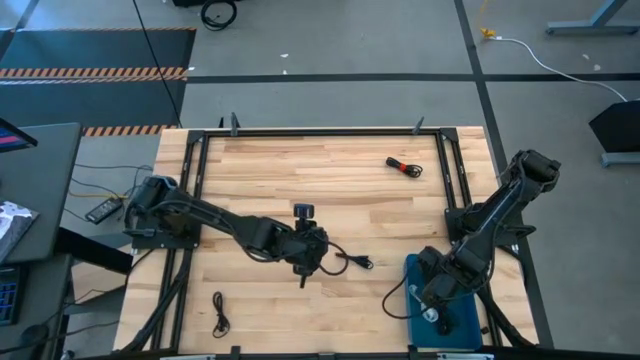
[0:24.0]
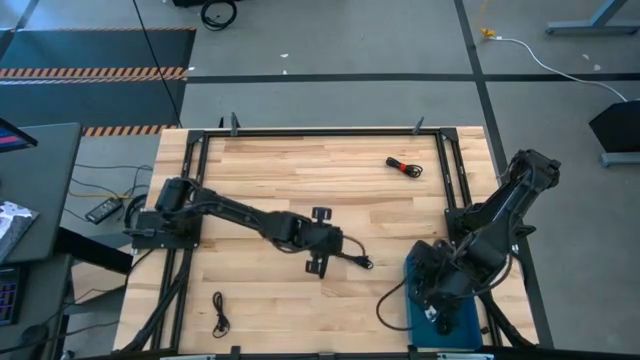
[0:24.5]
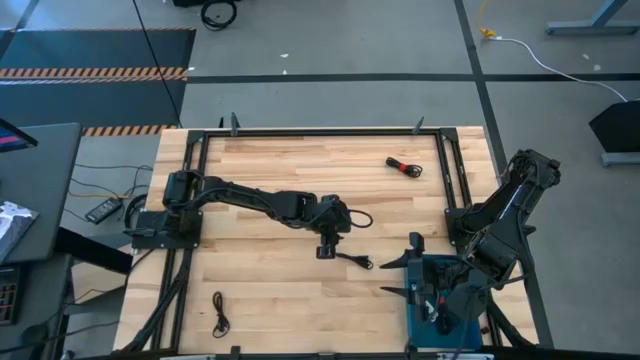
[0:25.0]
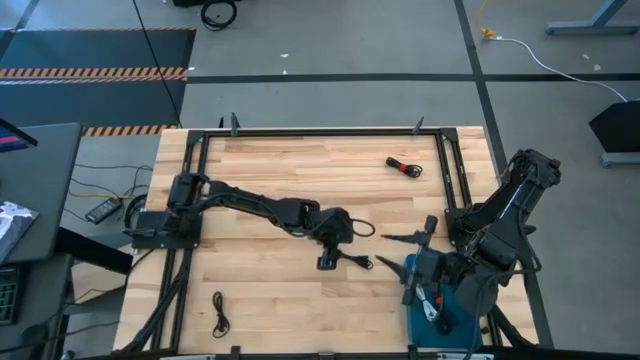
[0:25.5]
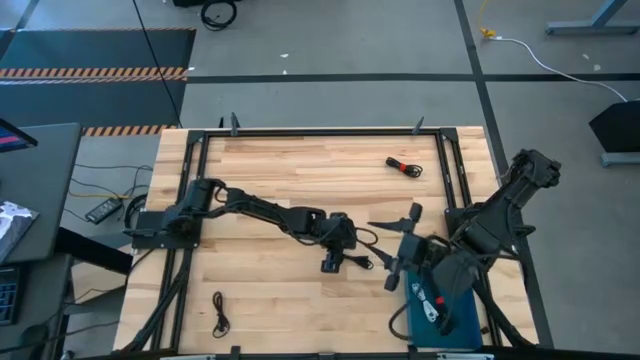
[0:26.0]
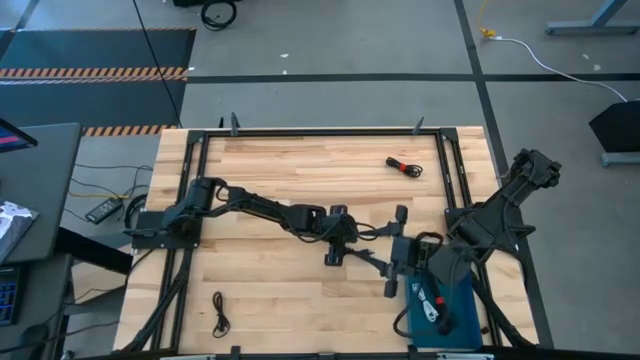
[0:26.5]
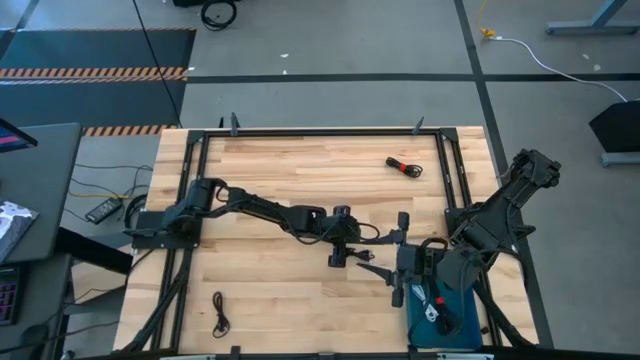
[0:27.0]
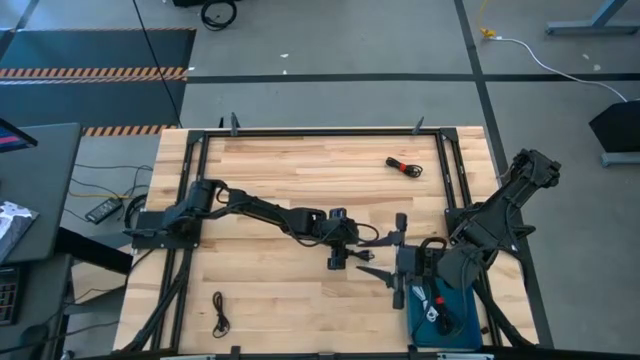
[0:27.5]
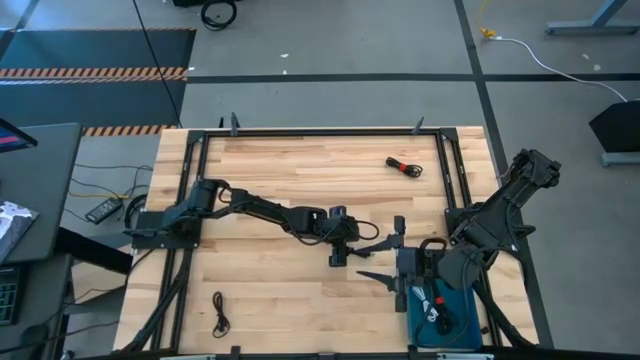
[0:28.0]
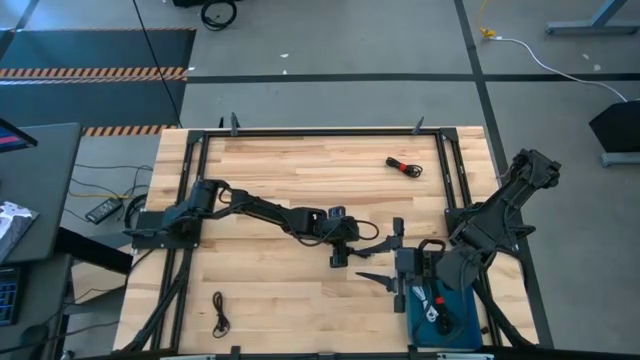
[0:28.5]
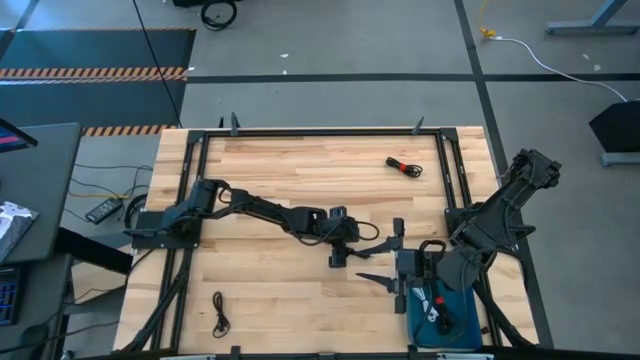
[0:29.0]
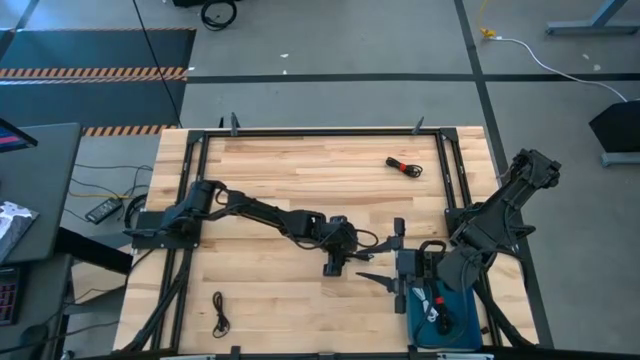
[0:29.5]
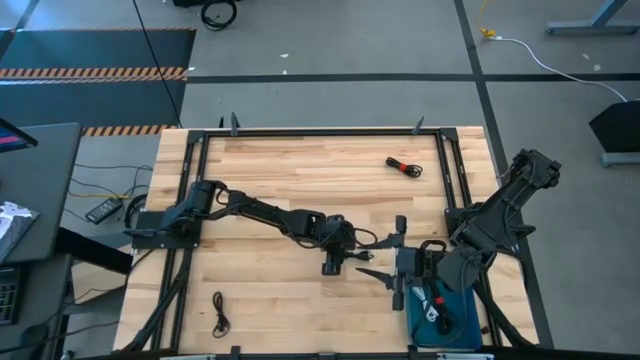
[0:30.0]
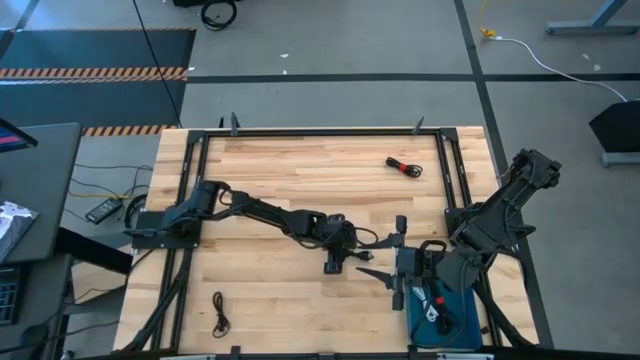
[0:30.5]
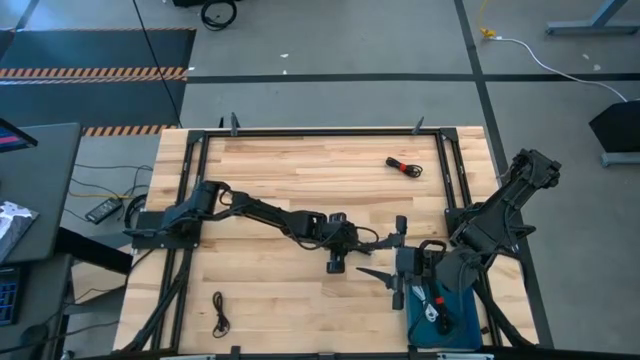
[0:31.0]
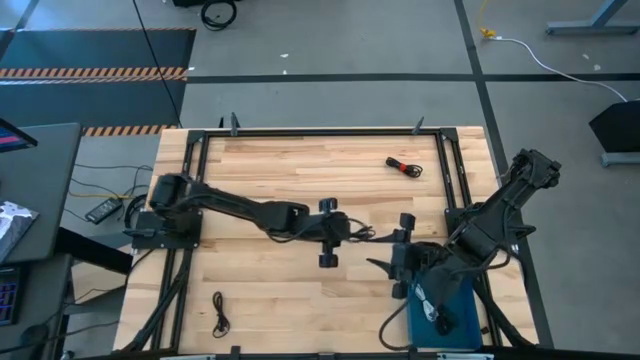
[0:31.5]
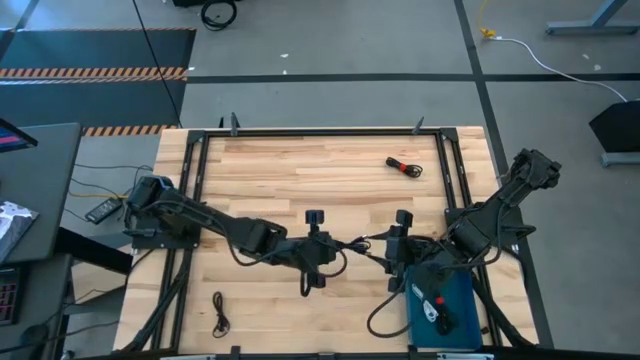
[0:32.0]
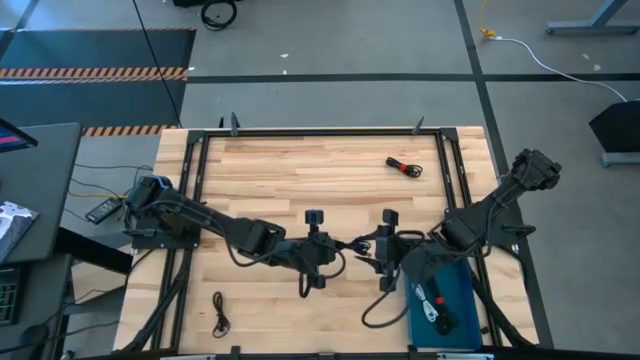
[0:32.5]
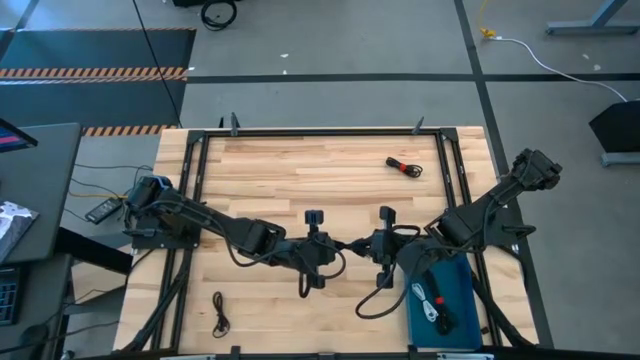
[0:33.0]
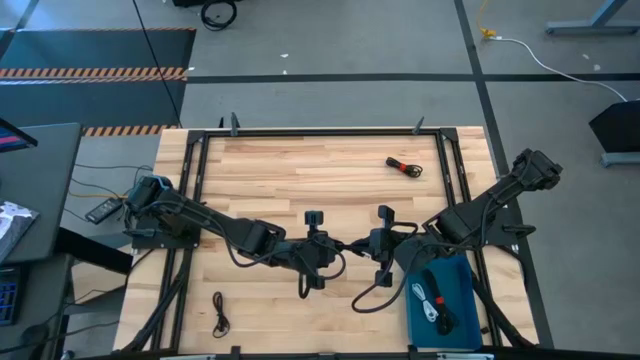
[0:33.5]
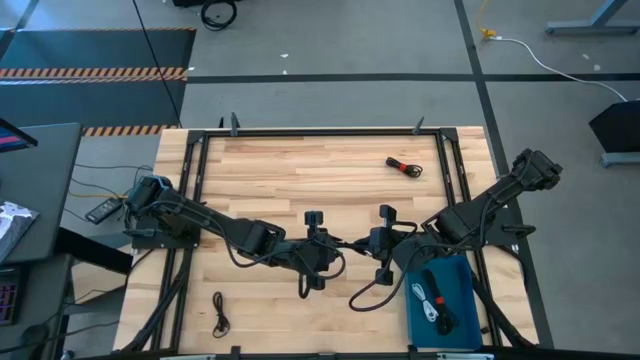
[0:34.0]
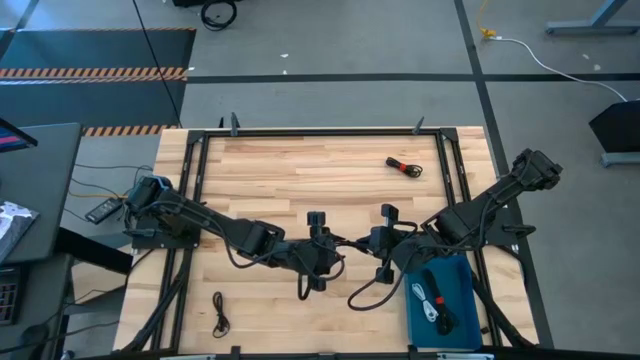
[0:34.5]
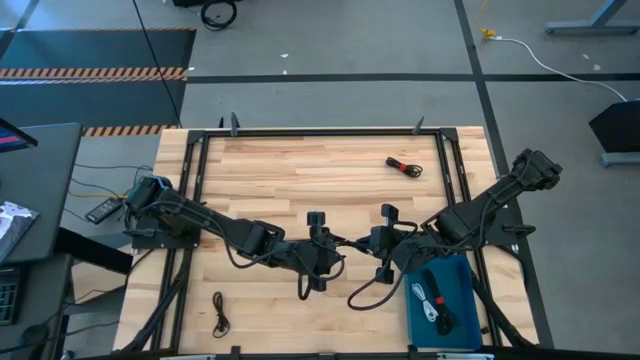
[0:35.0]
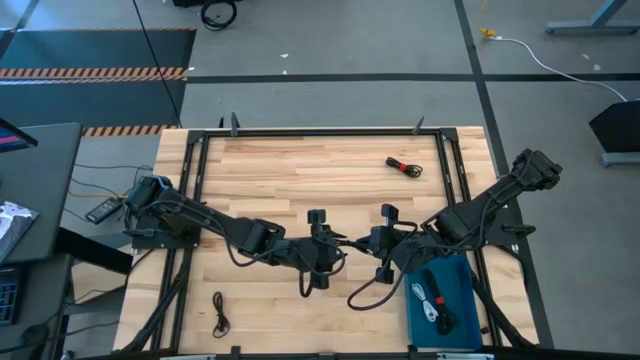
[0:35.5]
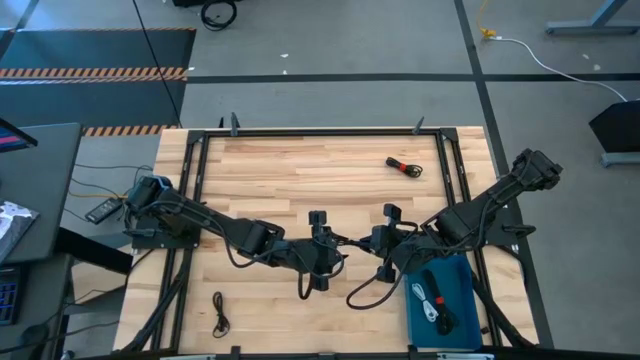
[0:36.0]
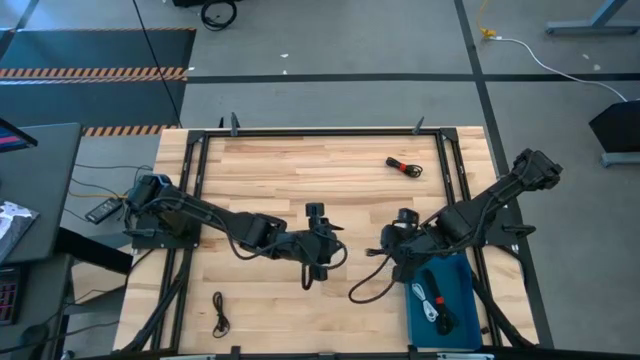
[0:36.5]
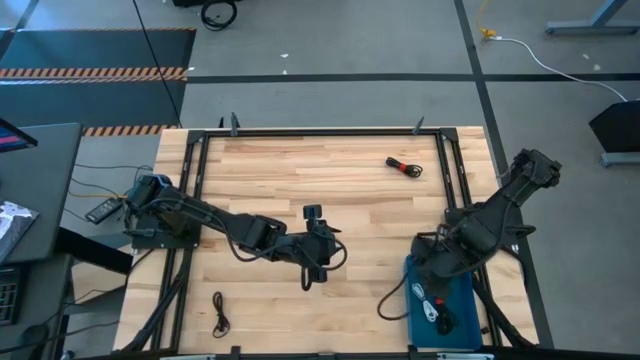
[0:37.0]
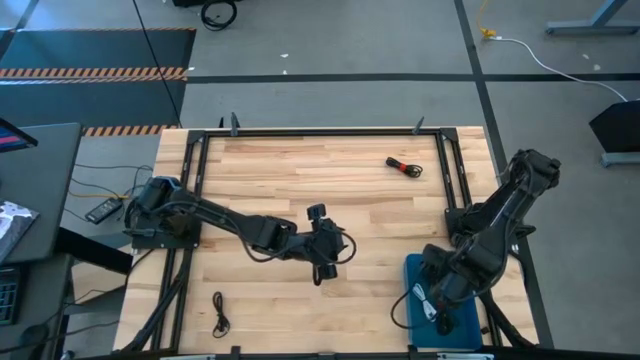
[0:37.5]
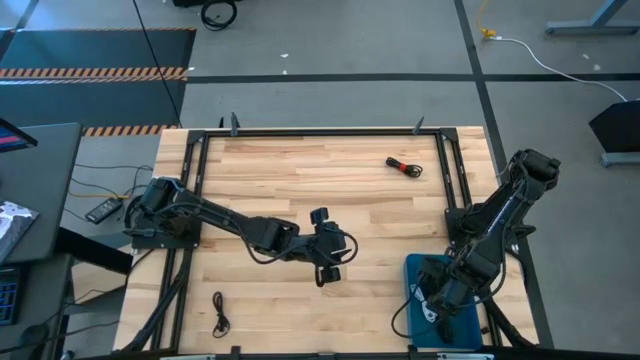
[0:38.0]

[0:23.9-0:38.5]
Task: Pick and place USB-C Cables
Put the black USB cable into the blue bin

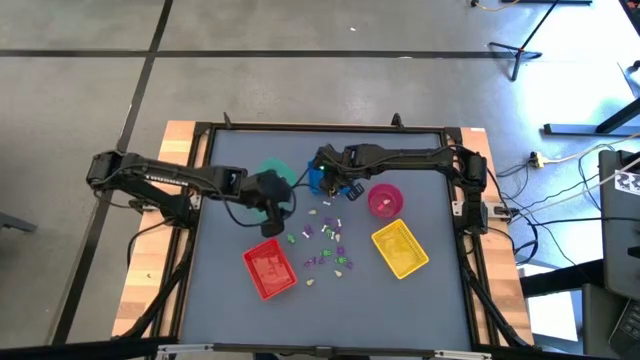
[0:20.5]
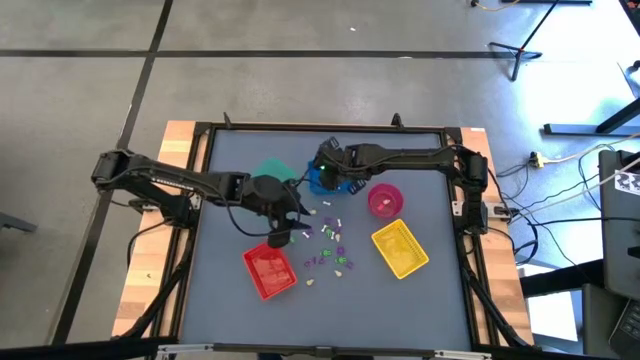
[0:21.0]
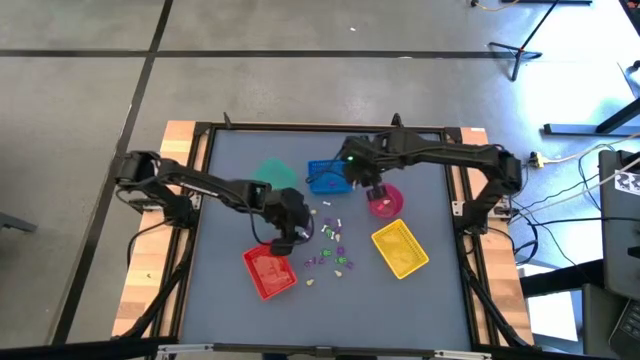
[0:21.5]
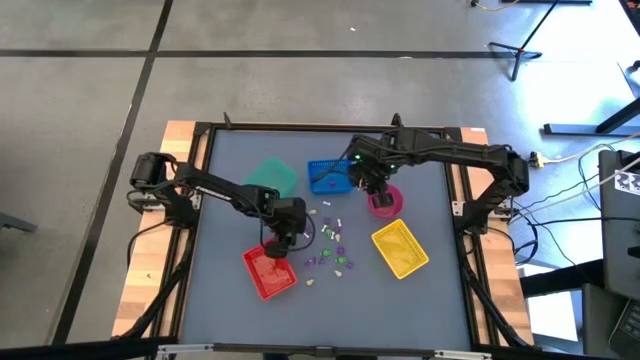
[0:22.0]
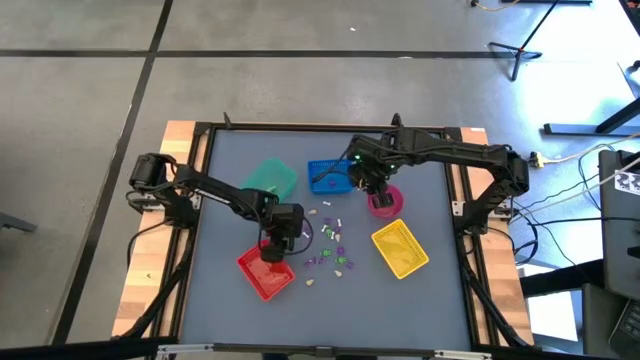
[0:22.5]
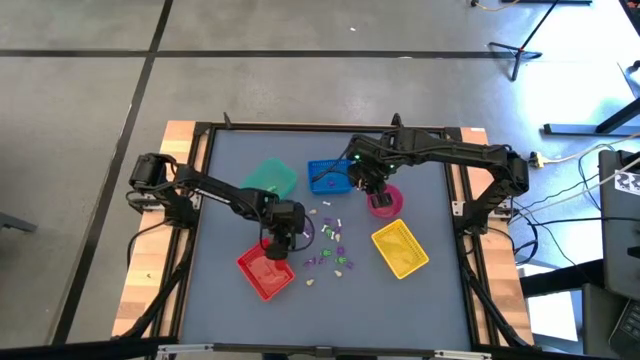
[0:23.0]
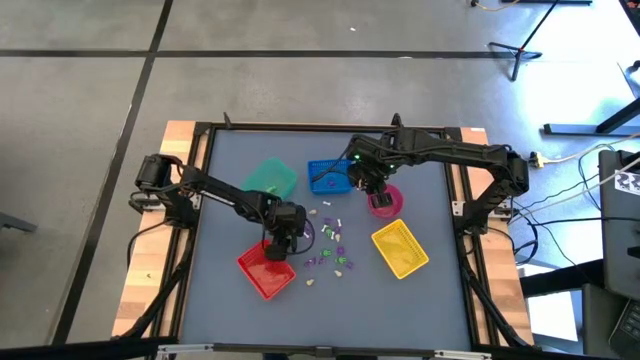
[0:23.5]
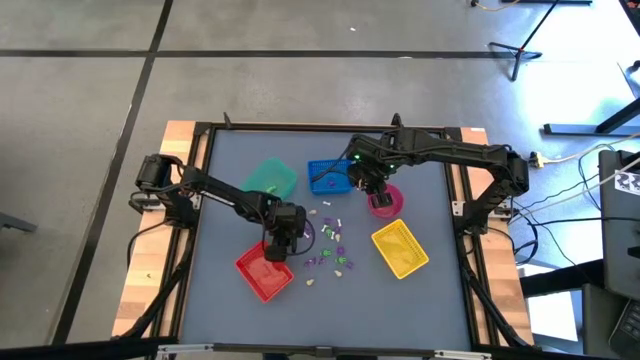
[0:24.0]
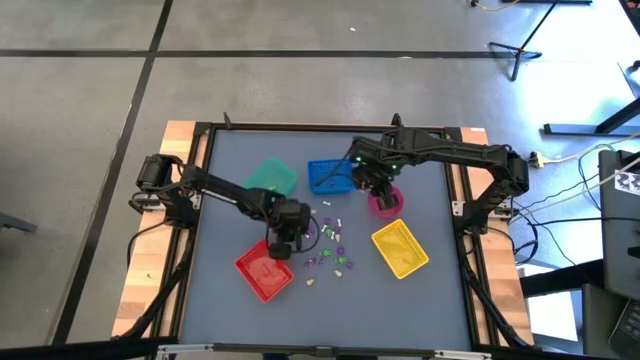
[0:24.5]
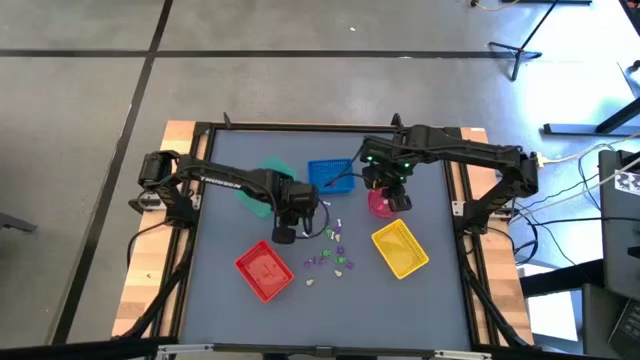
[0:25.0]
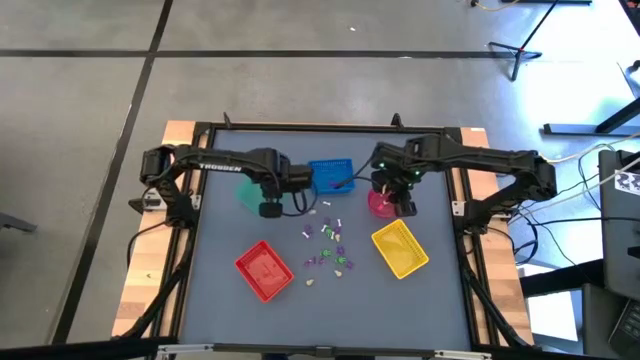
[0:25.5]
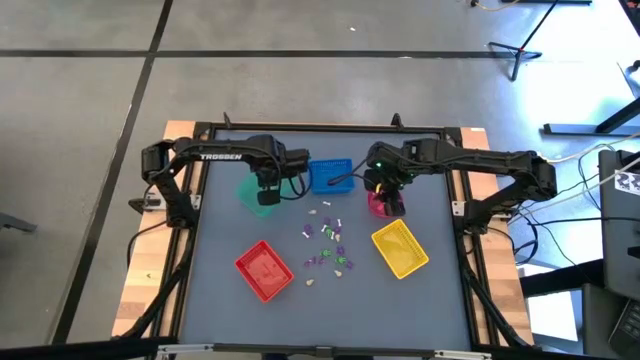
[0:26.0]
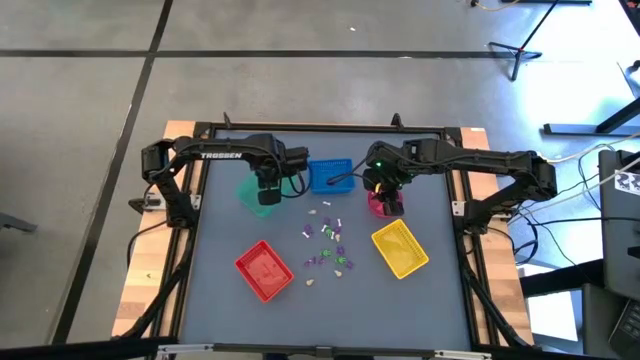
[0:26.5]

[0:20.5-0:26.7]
Task: Sort Halloween decoration
Put the green skeleton toy into the green bin
